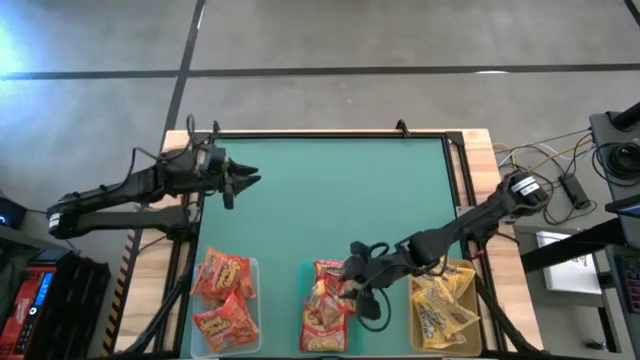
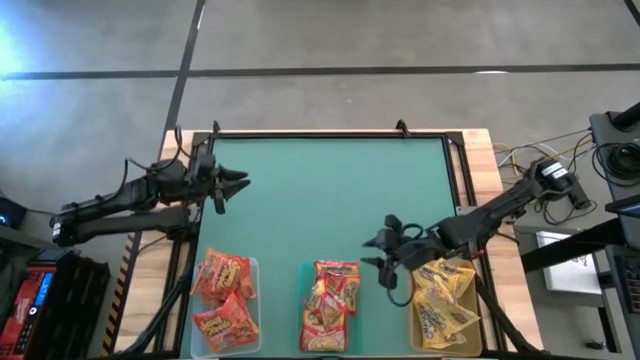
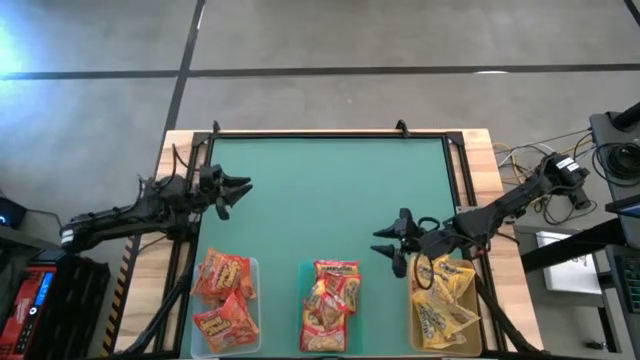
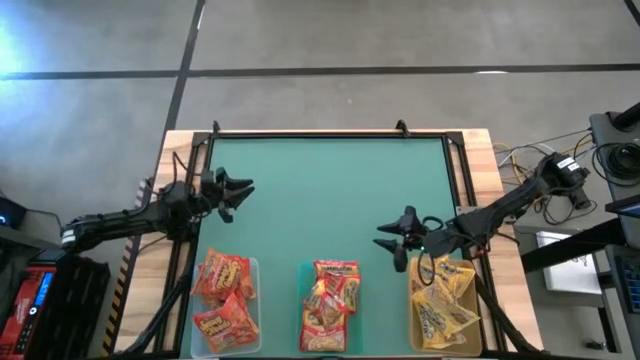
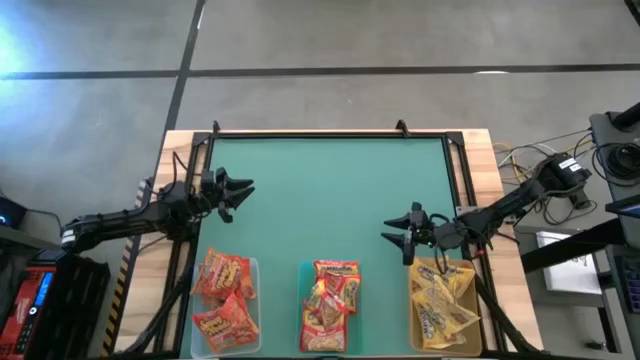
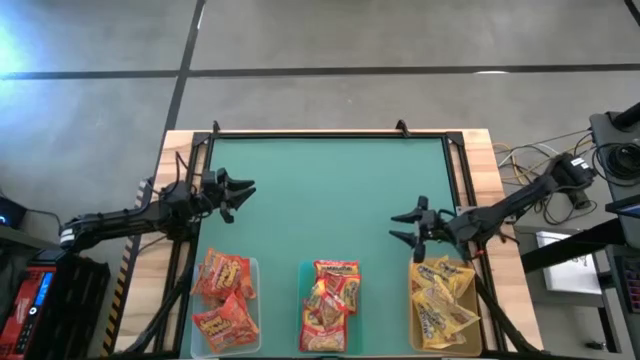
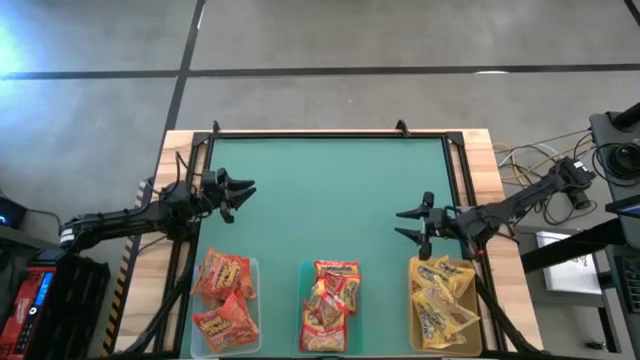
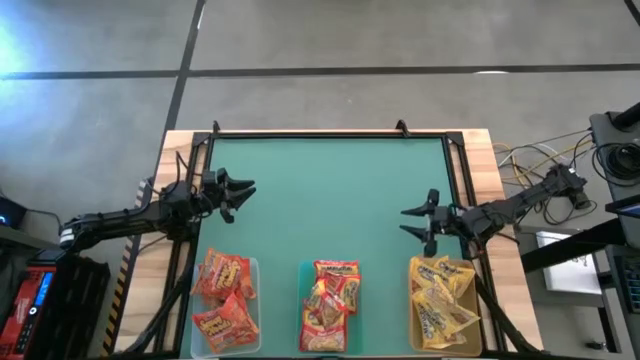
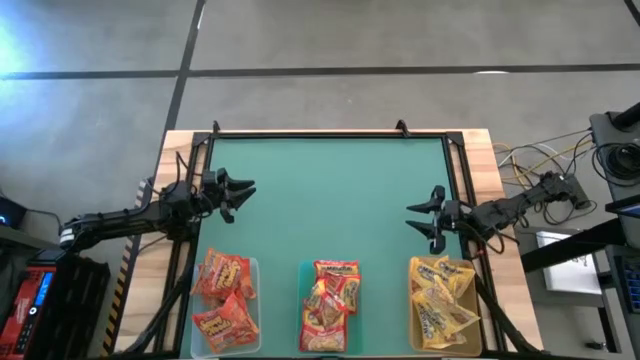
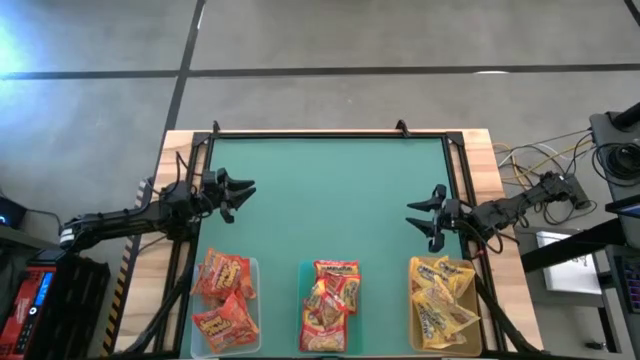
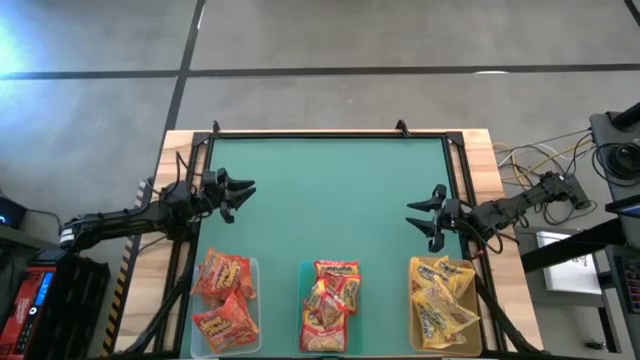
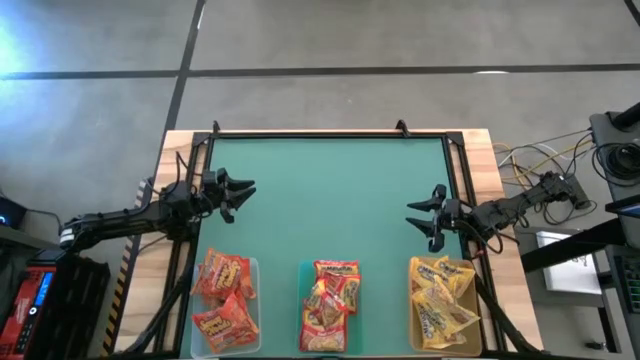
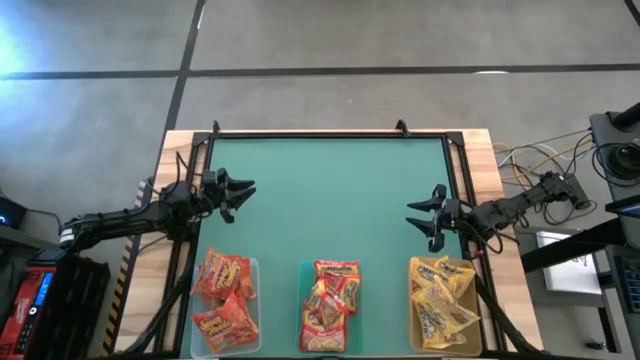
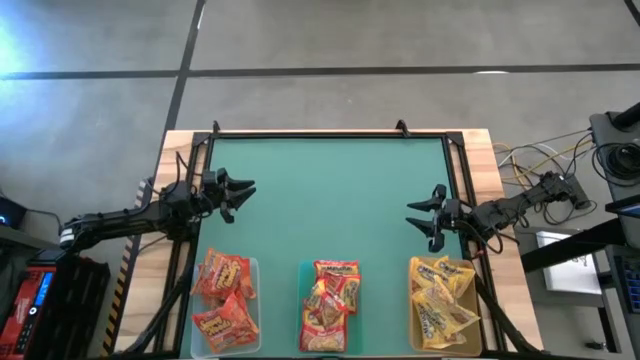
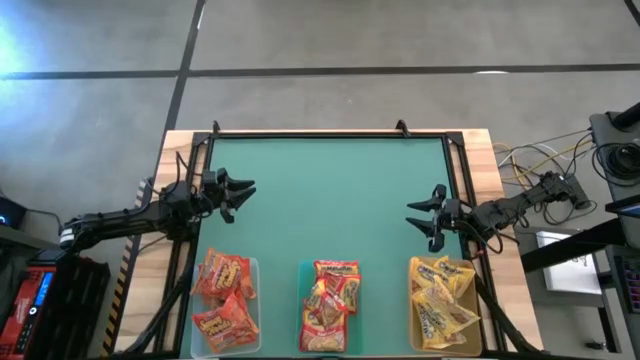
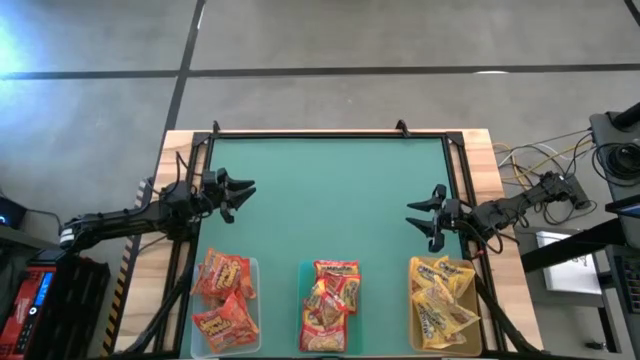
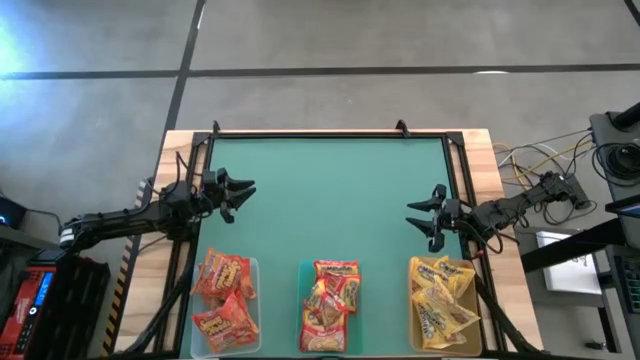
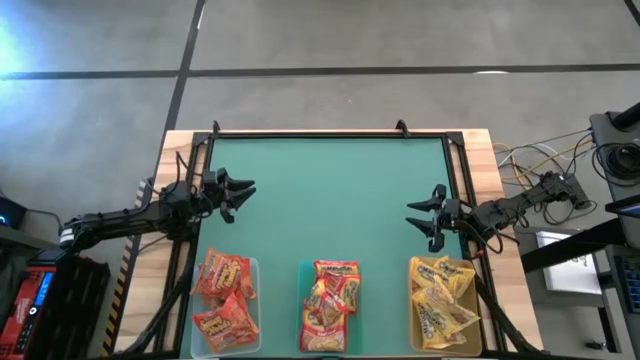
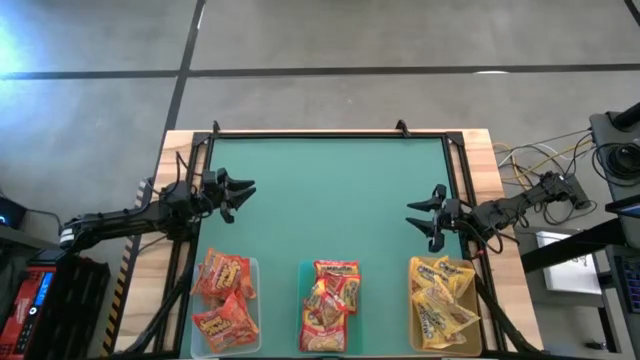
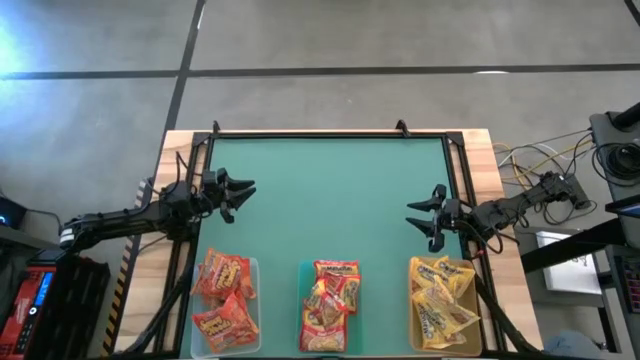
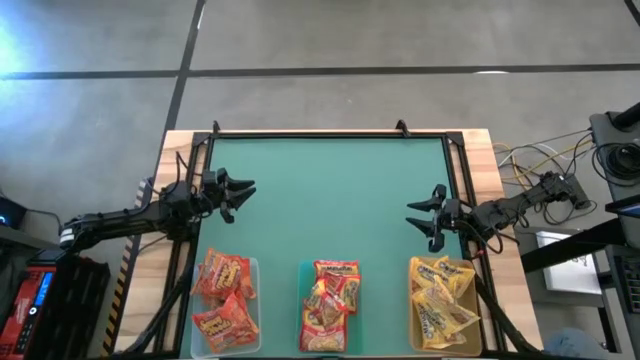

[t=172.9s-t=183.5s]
Task: Sort Maruchan noodles
Return to Home Position
